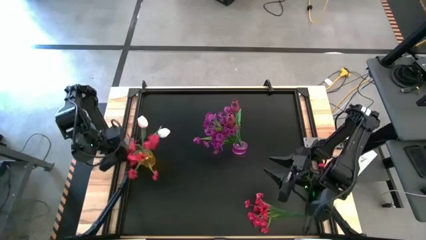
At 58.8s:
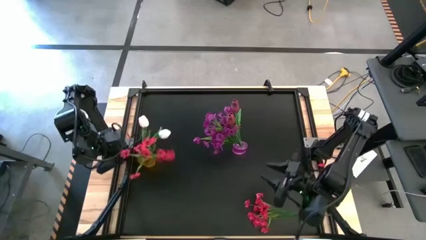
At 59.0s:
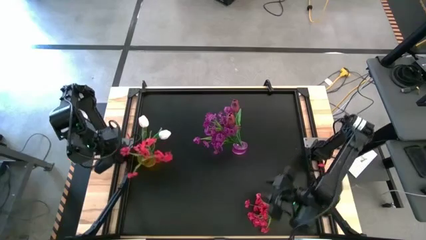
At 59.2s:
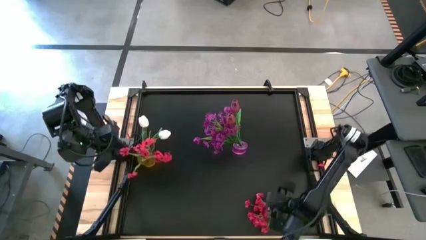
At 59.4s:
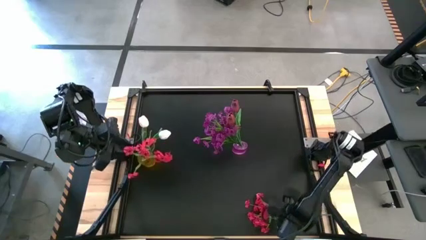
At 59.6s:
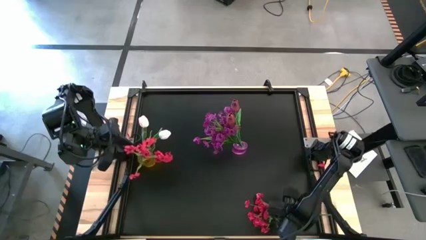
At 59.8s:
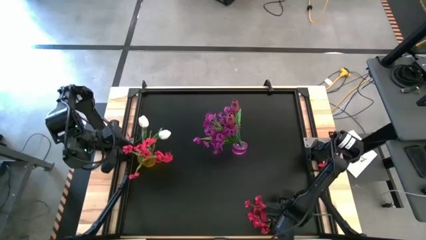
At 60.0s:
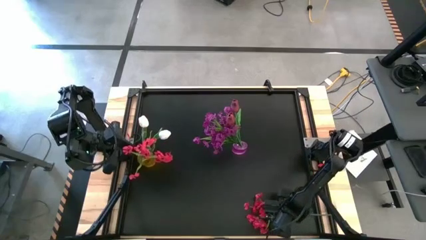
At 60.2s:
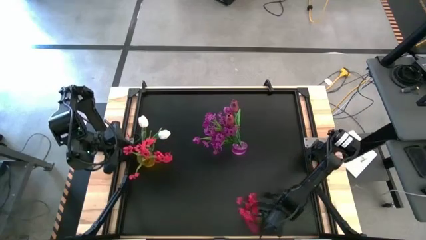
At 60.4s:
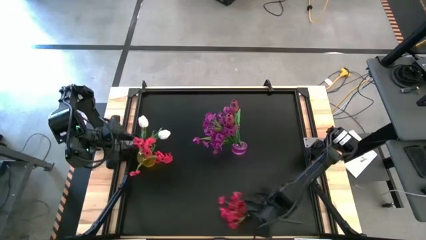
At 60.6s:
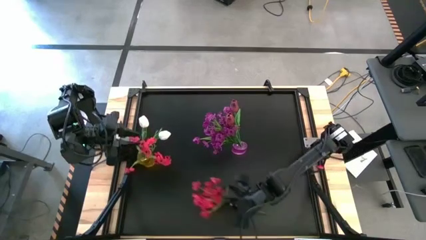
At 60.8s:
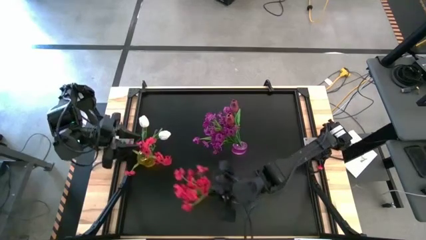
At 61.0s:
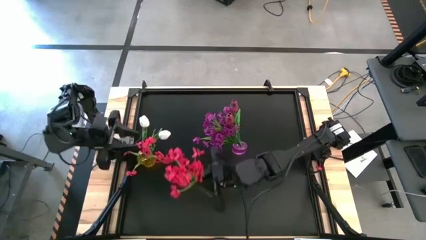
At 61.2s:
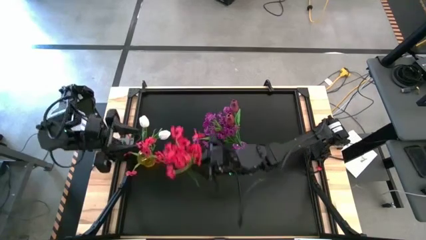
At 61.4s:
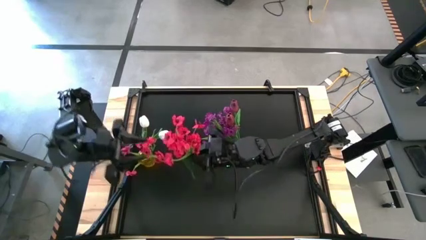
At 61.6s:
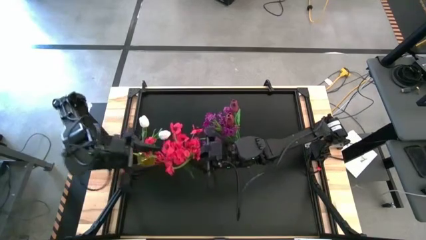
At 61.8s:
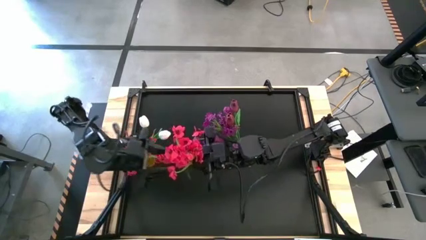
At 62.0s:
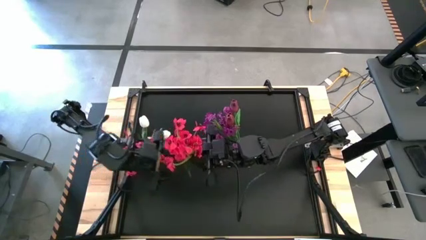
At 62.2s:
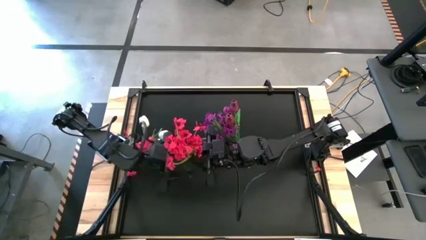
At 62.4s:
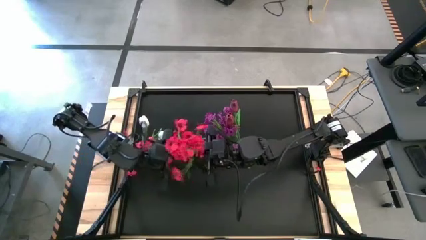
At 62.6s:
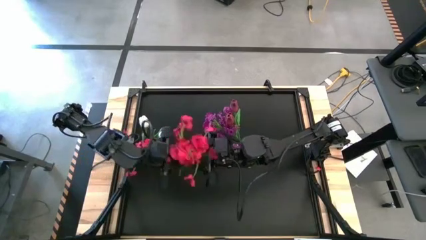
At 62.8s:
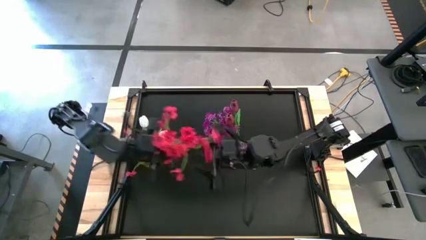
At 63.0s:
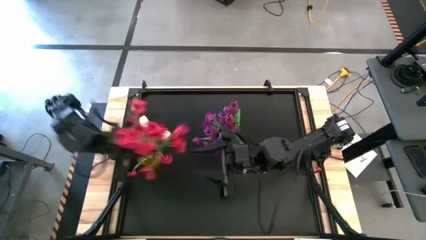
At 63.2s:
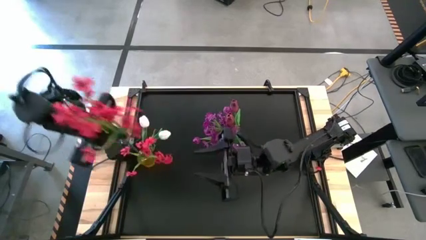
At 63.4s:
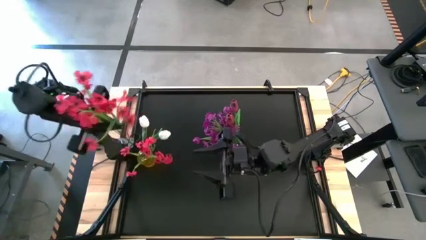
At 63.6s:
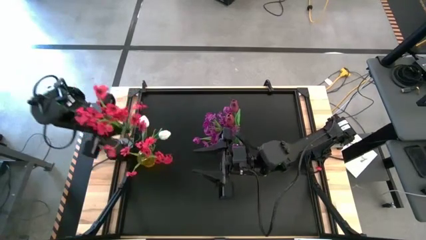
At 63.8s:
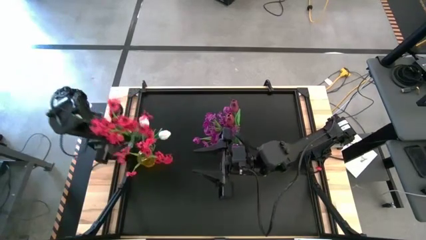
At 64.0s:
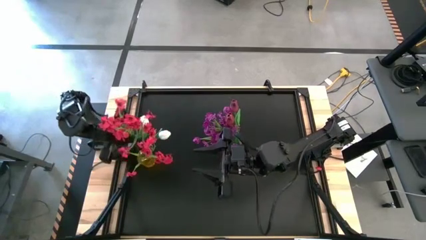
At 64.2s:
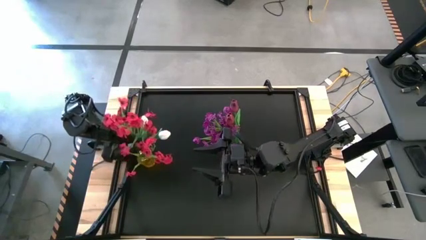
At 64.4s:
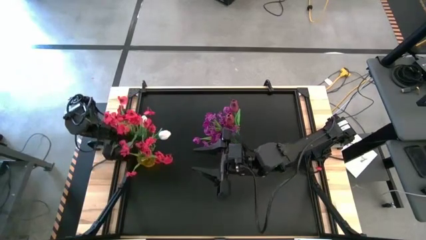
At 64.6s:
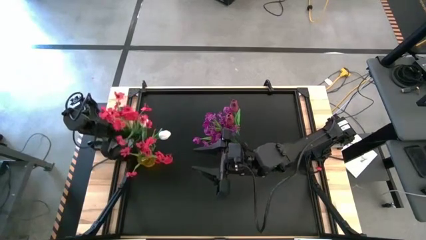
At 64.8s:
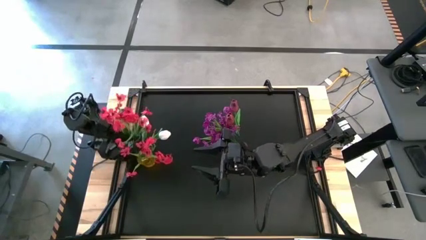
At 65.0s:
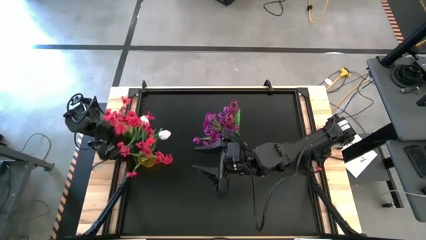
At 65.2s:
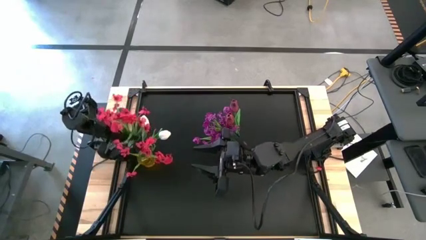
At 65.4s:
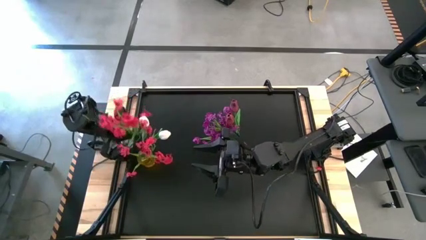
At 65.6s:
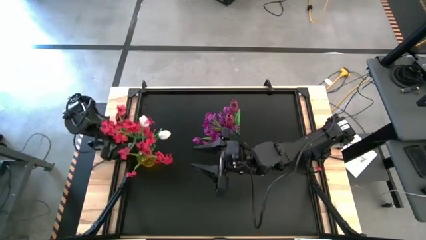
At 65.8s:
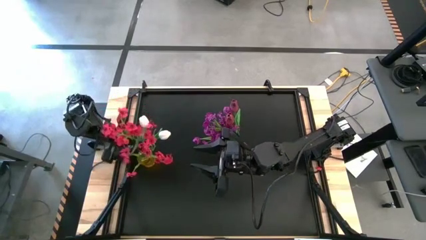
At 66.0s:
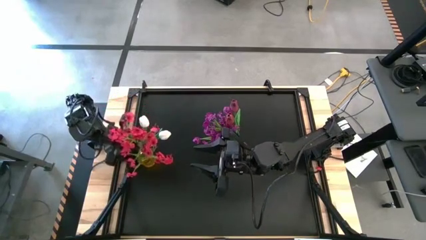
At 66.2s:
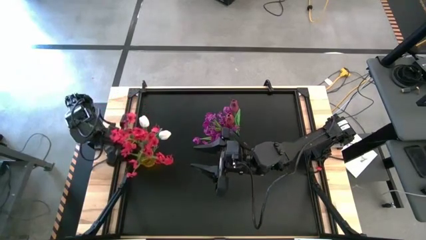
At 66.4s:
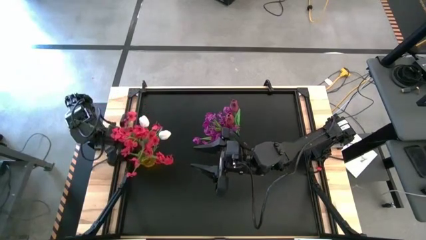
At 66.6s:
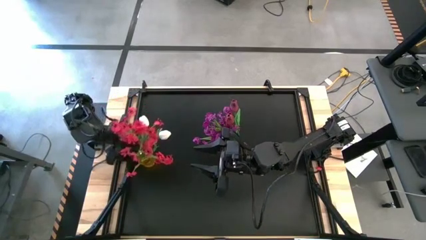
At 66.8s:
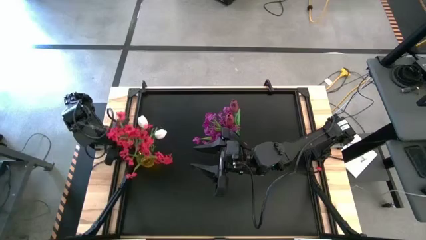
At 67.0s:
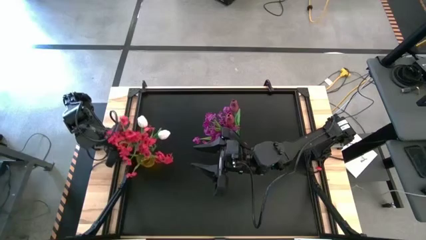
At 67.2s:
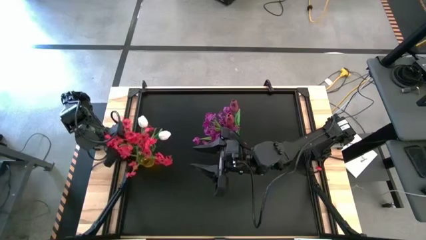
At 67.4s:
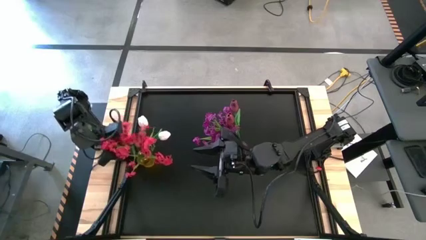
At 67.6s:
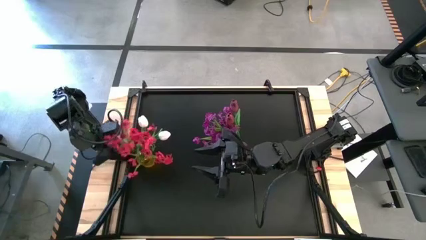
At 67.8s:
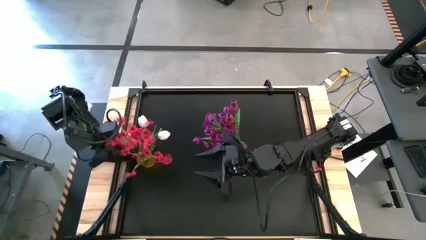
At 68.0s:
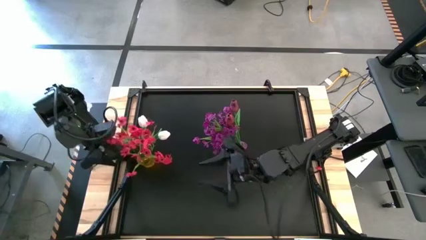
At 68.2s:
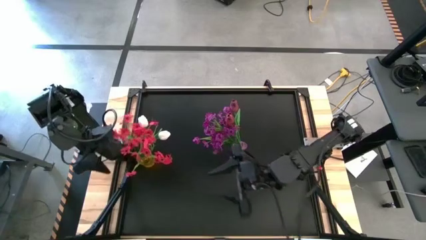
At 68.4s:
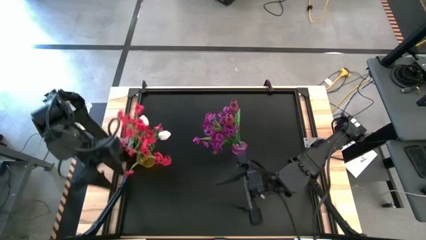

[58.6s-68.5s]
Task: Sort flowers into vase by color
Put the red flowers into the yellow flower vase

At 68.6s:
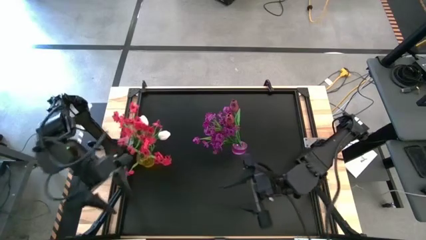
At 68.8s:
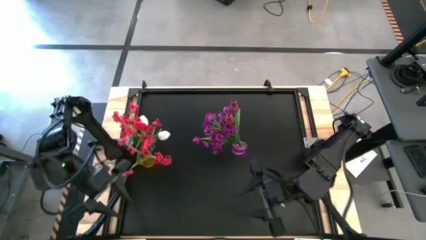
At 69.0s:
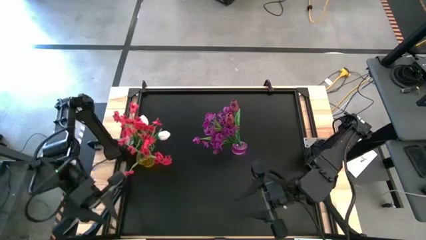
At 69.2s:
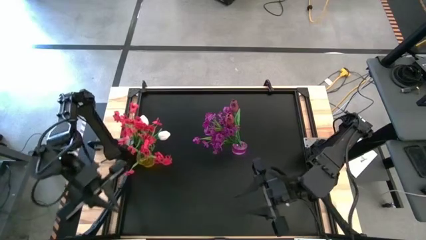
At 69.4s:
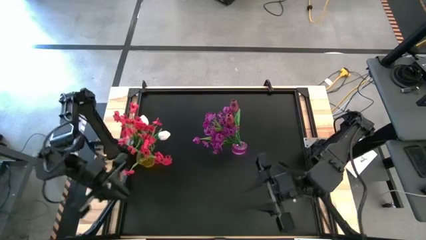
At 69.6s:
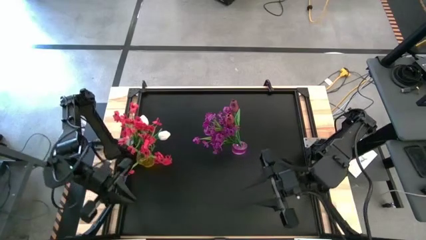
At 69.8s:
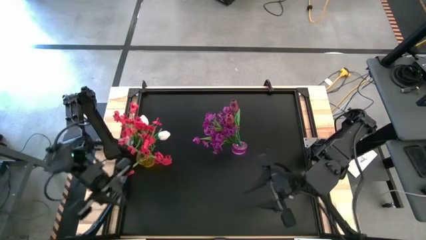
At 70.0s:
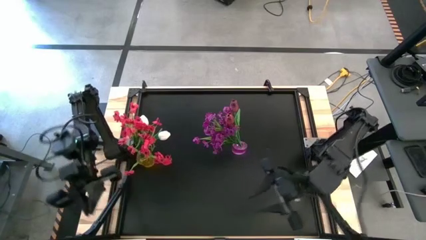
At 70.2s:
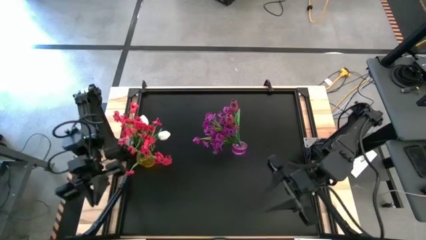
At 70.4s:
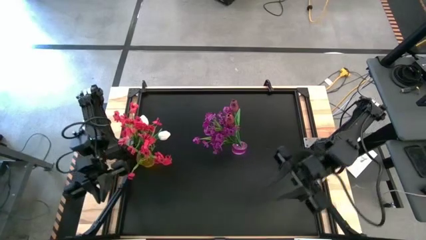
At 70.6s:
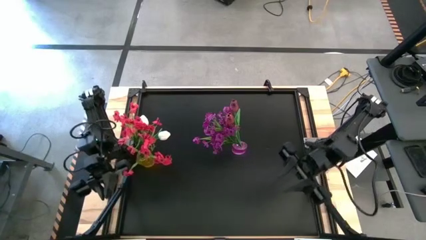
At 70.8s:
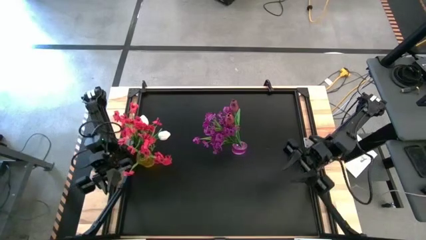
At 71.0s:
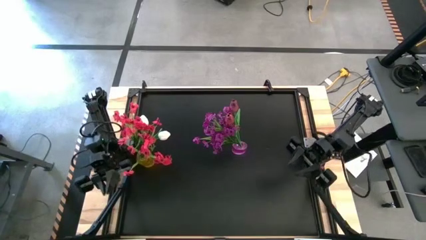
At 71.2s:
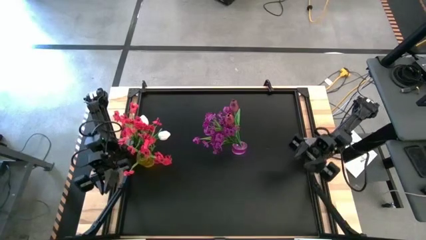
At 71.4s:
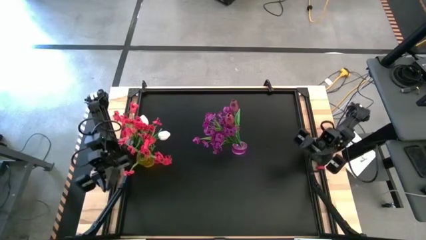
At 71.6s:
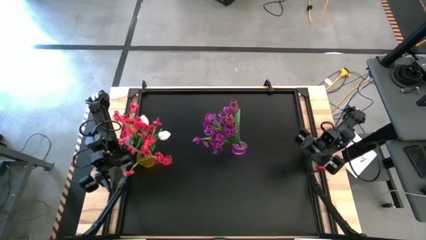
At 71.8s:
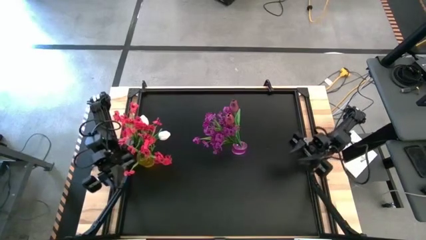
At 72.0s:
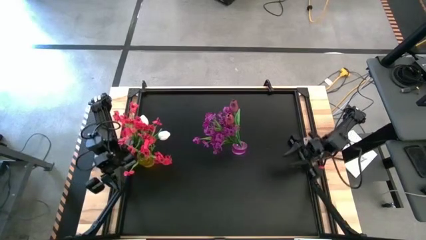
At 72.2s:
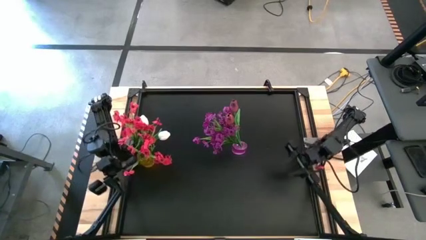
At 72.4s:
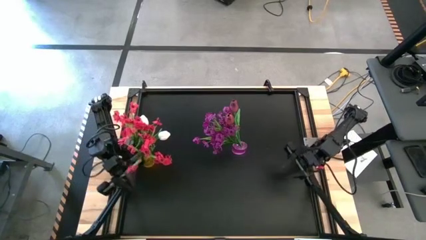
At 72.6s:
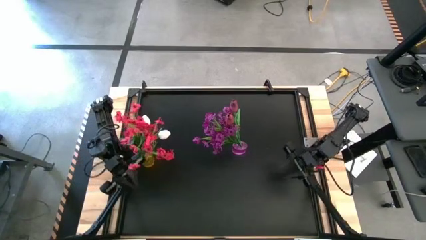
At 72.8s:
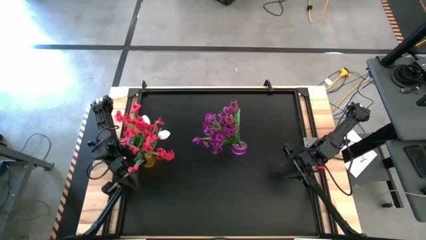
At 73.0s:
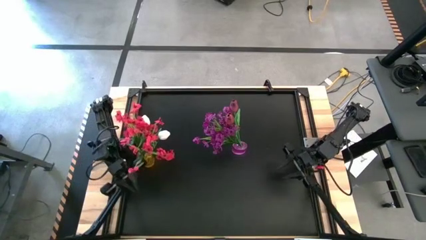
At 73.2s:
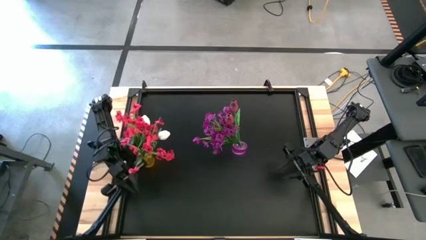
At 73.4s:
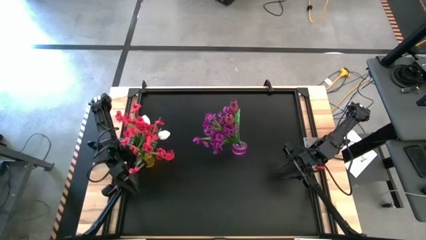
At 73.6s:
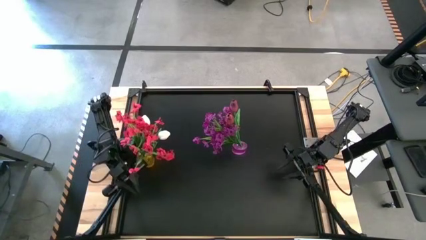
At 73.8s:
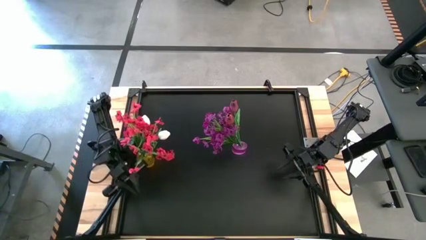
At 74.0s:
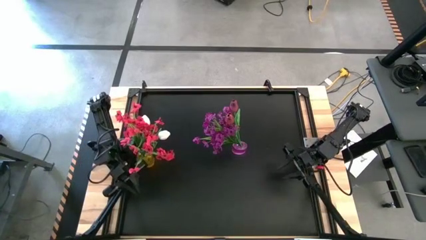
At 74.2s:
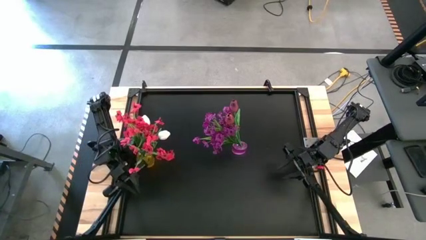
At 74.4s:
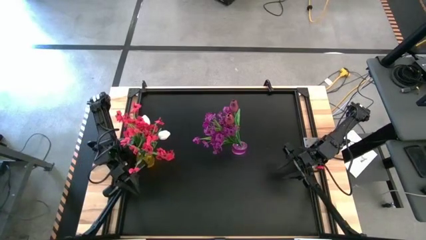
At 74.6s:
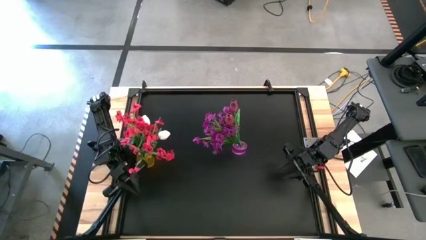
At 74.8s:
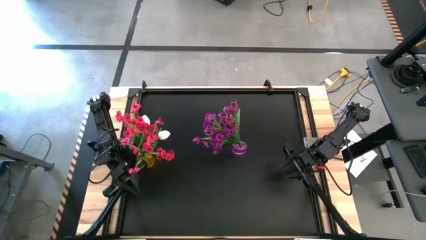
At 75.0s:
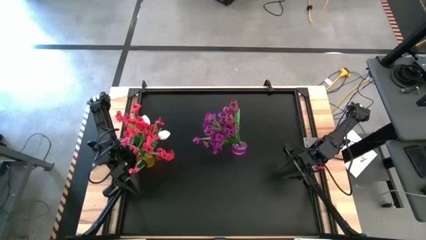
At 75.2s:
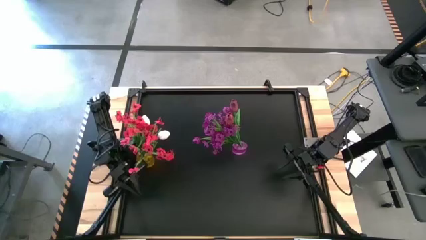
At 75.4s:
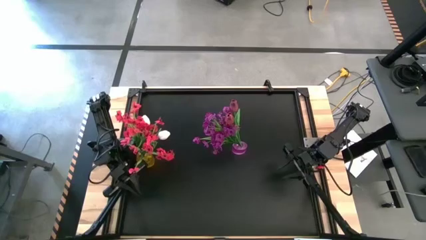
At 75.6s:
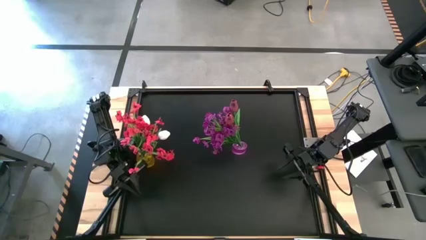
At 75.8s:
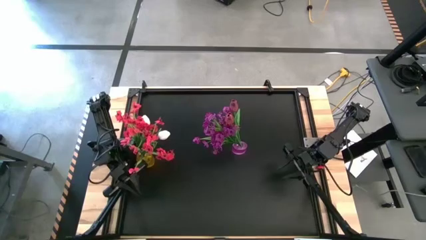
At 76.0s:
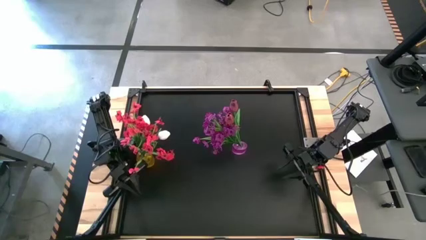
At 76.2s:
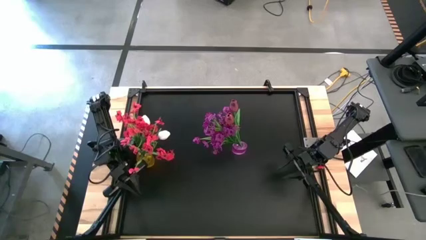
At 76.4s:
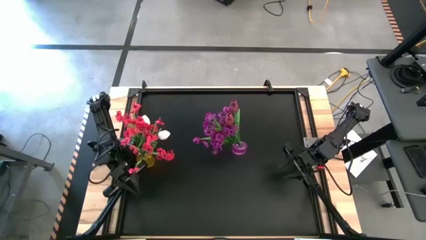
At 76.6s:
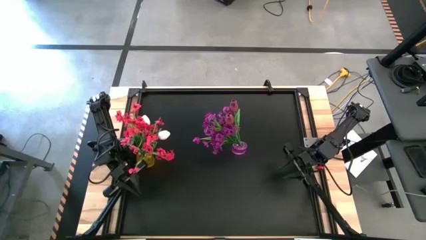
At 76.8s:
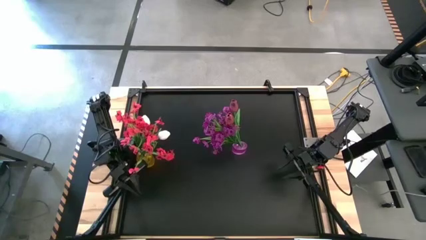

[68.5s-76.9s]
Return to Home Position
